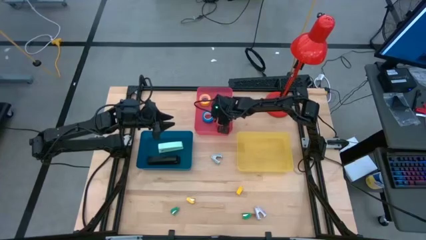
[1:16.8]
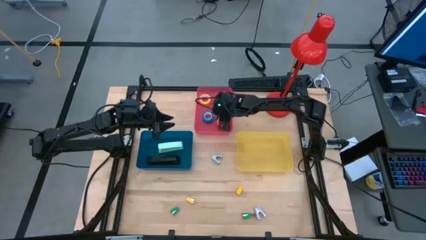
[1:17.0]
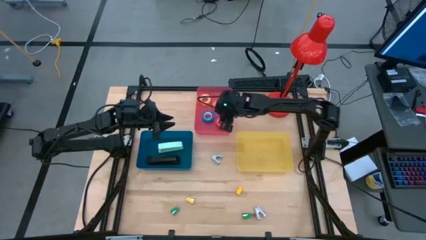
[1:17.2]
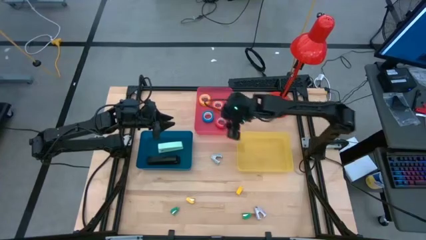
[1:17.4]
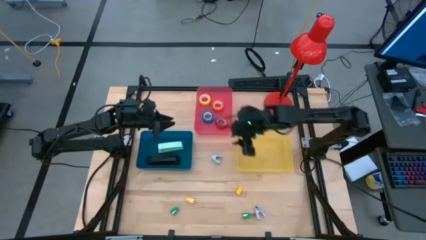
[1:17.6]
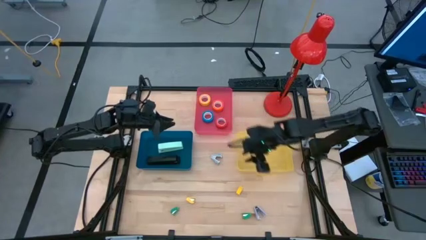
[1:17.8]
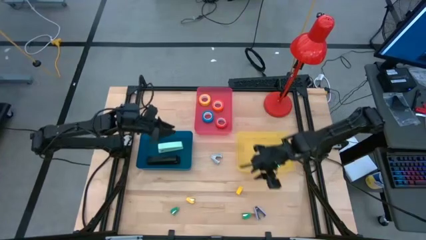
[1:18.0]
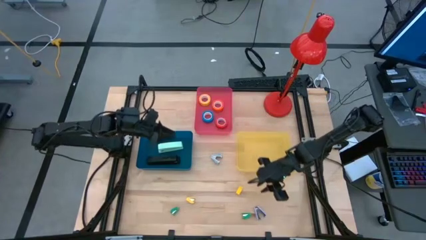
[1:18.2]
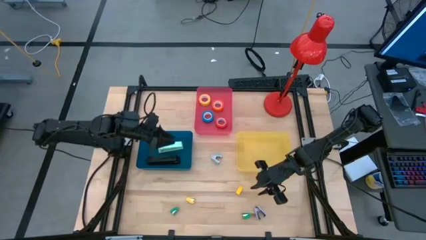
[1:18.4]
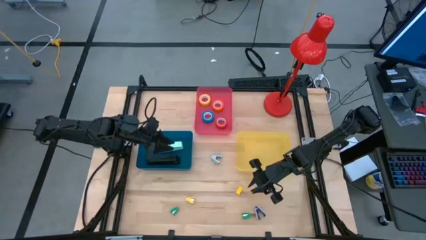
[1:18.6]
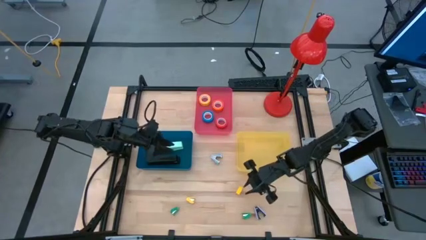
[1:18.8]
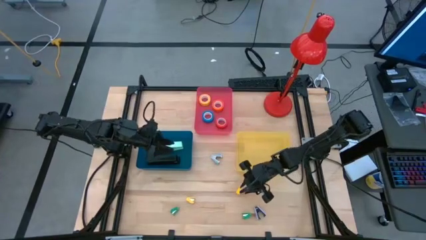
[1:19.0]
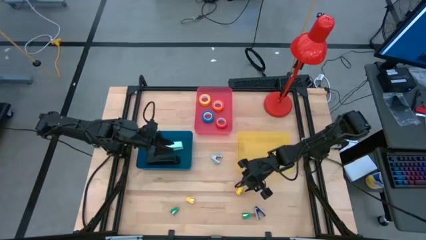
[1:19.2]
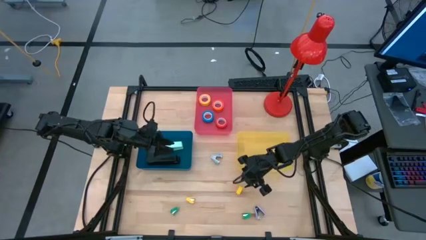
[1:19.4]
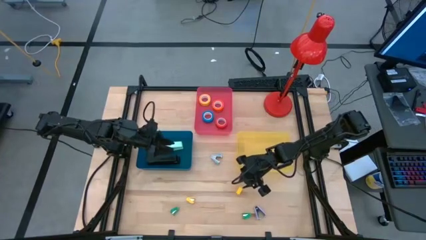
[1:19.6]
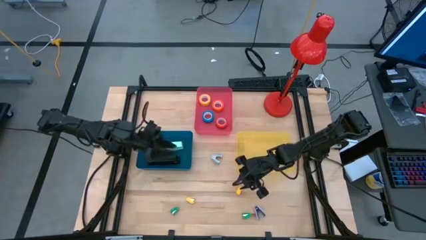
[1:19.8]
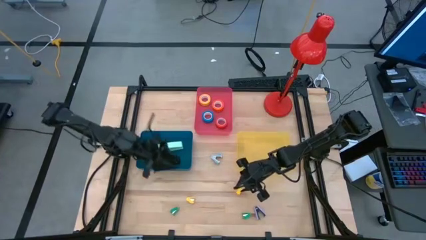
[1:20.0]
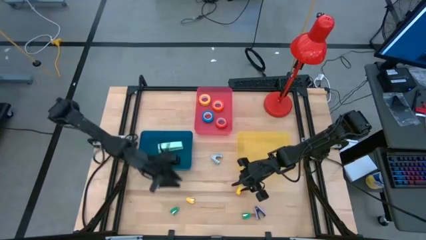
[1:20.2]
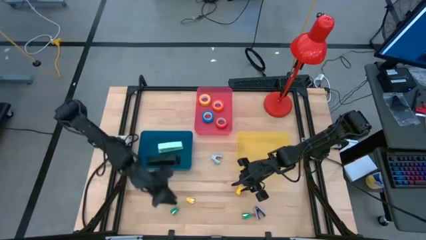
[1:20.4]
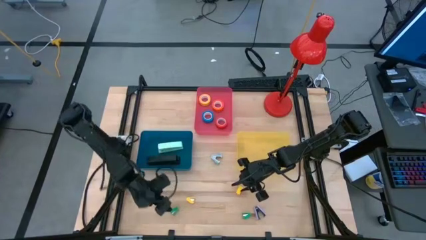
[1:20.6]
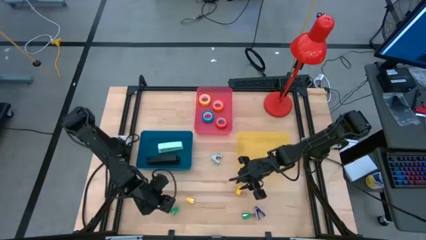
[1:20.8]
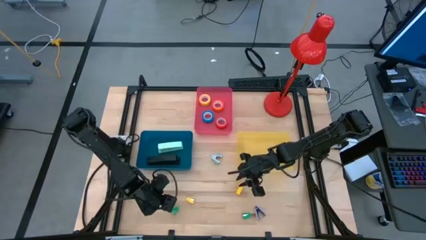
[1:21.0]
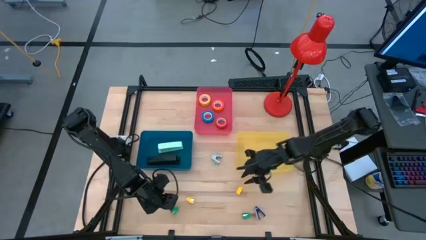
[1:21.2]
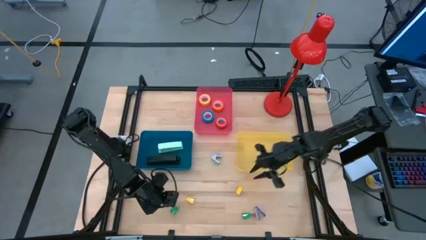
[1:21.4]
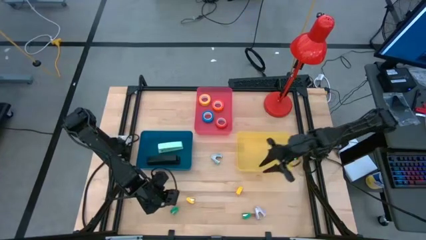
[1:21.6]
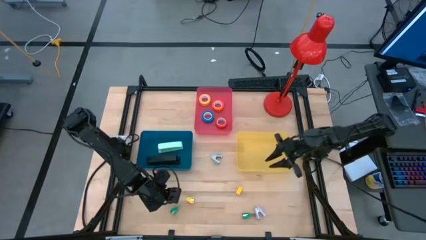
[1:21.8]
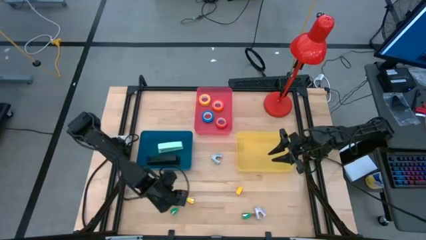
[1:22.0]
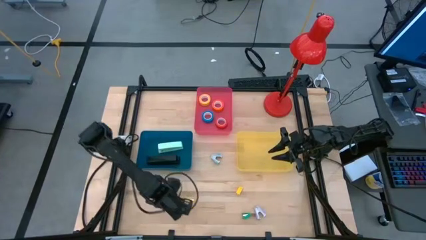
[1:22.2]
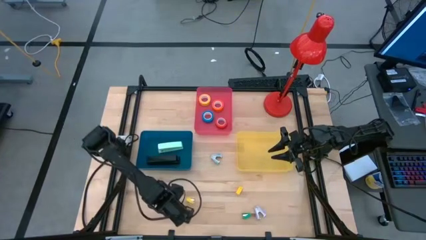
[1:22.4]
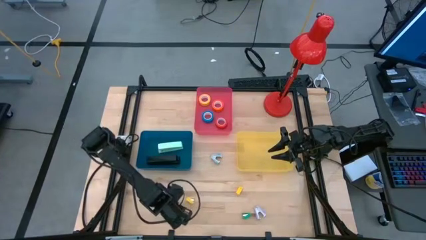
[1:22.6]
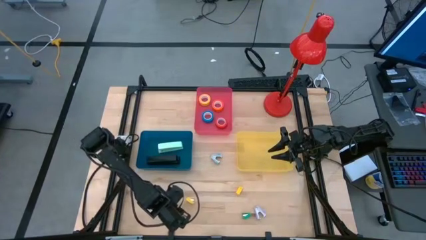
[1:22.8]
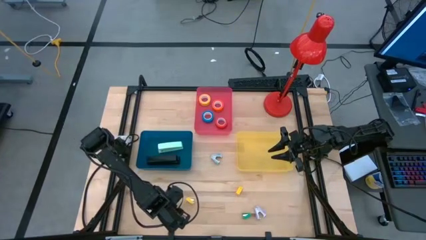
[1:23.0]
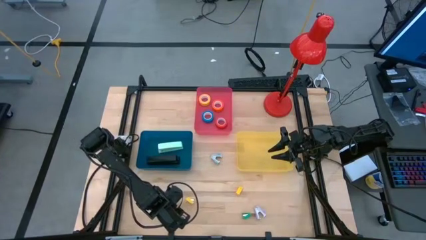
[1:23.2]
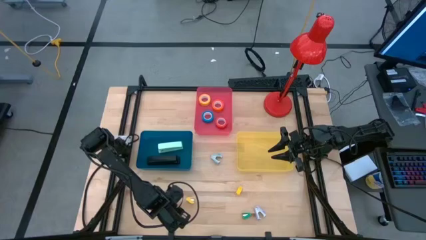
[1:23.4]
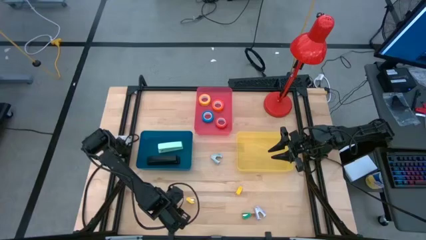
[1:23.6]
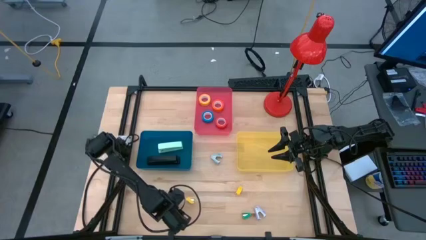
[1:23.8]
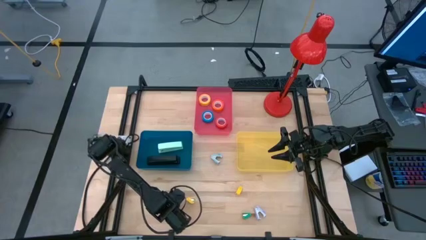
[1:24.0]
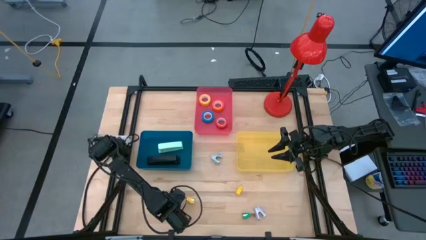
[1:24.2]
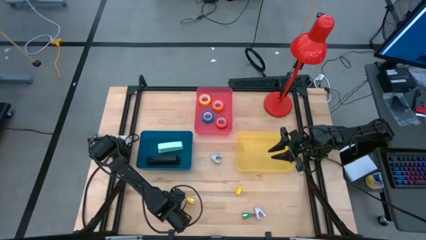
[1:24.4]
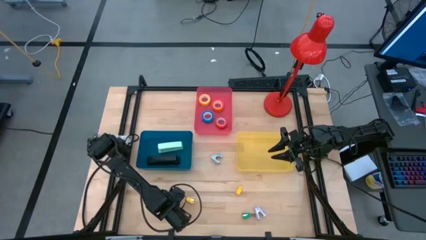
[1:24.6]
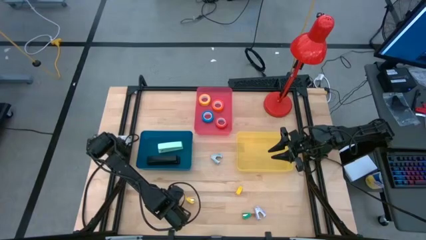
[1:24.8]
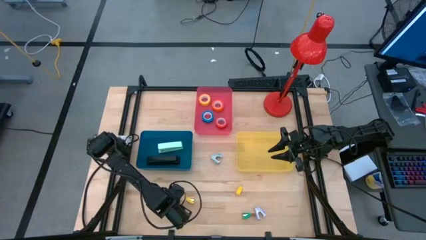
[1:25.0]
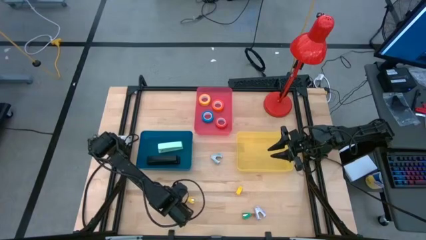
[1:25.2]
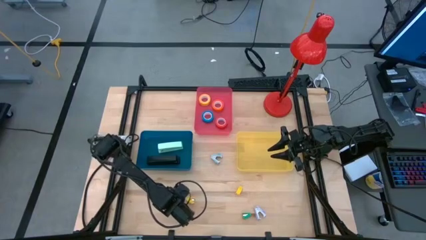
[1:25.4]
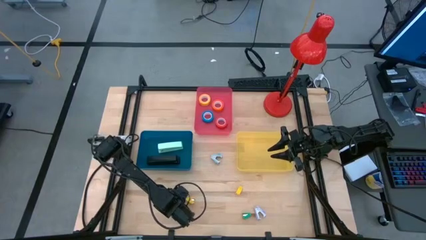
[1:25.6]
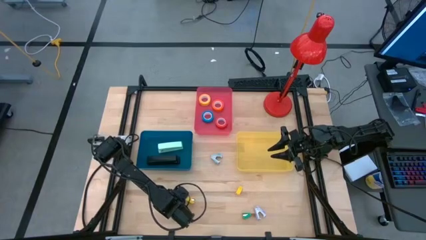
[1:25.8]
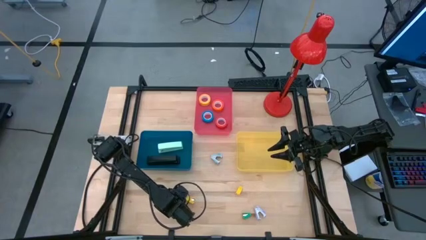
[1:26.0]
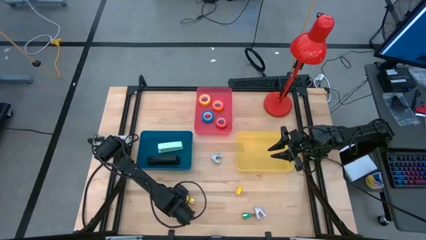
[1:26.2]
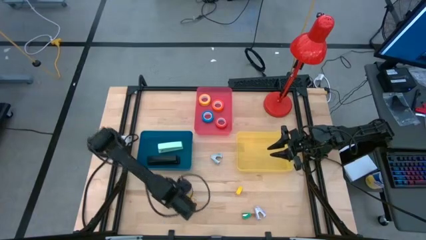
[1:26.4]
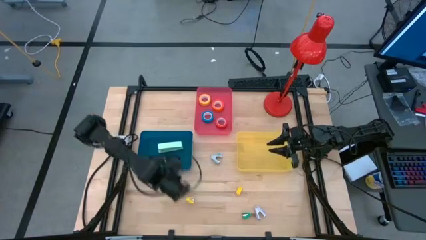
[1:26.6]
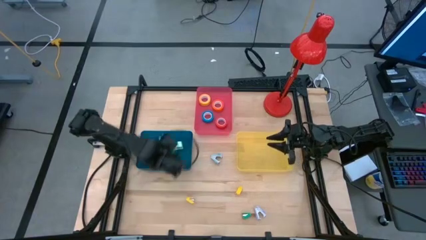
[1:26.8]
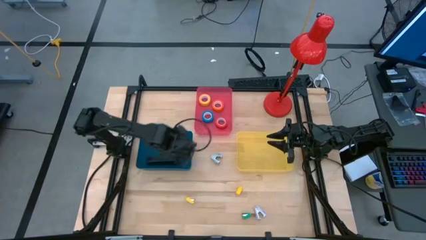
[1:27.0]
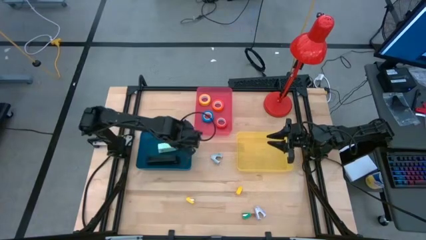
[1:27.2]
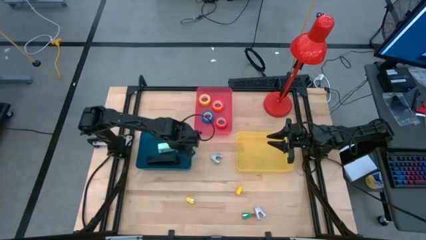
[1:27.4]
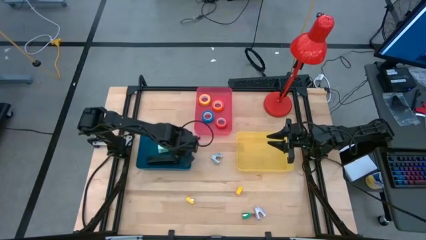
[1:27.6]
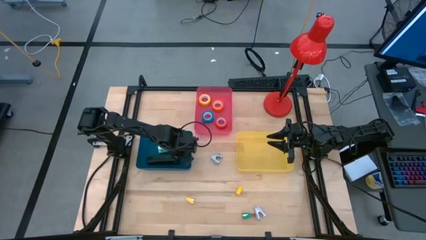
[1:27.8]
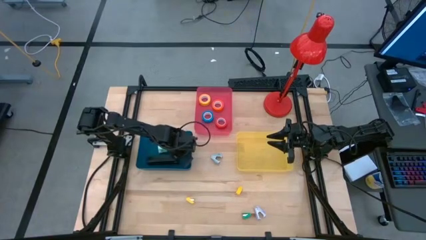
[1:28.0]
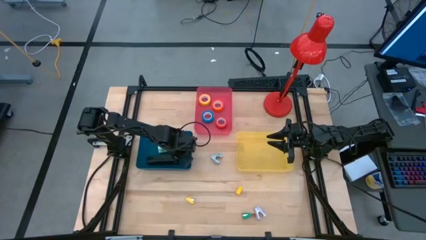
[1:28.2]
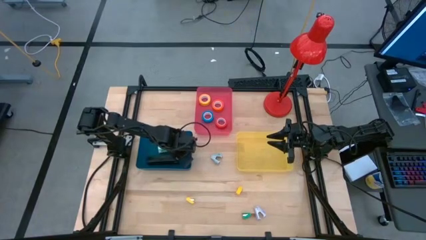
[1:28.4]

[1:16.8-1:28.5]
Task: Pick and place Stapler, Stapler remover, tape
Put the left green stapler into the blue bin

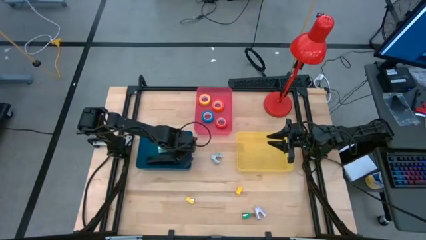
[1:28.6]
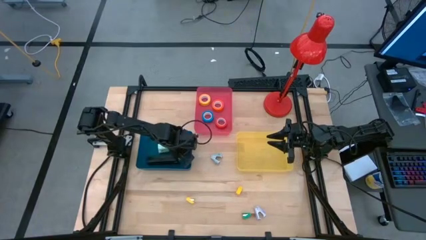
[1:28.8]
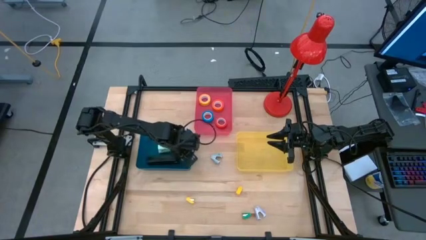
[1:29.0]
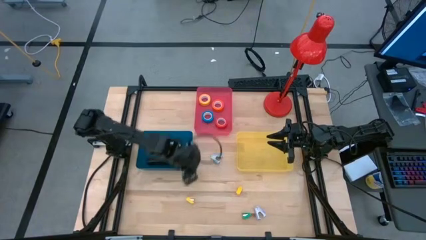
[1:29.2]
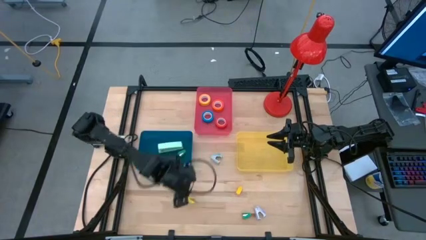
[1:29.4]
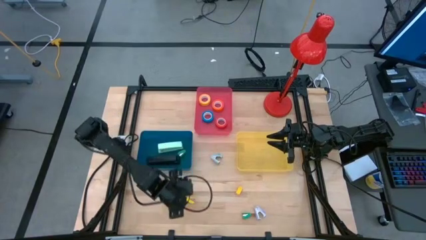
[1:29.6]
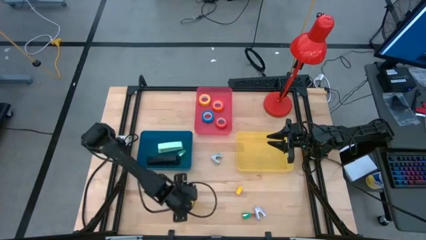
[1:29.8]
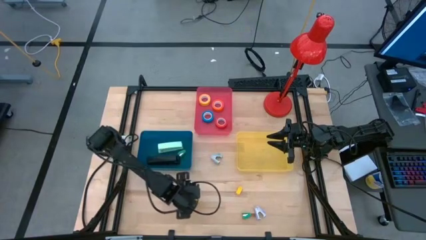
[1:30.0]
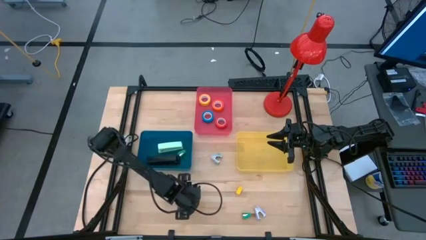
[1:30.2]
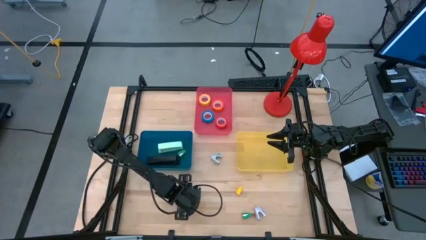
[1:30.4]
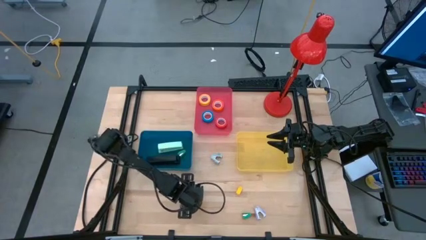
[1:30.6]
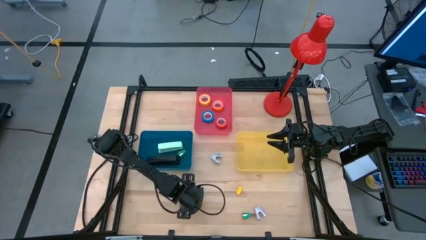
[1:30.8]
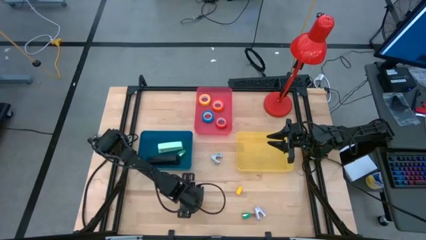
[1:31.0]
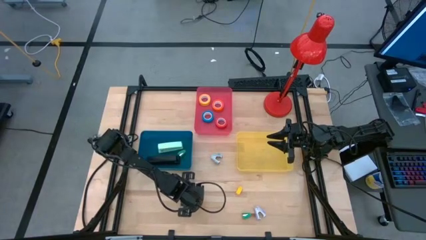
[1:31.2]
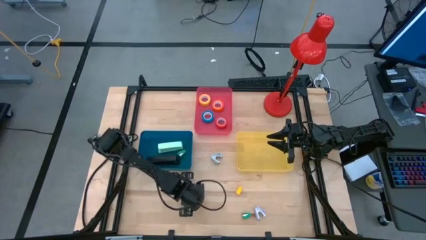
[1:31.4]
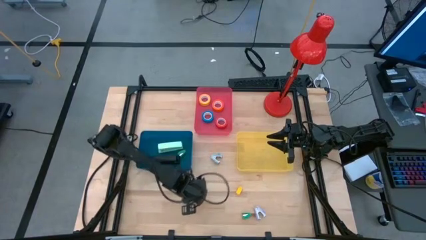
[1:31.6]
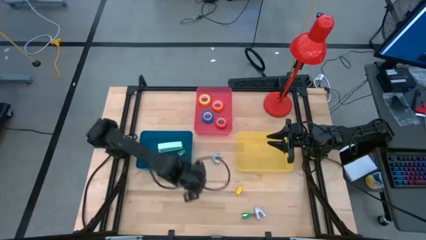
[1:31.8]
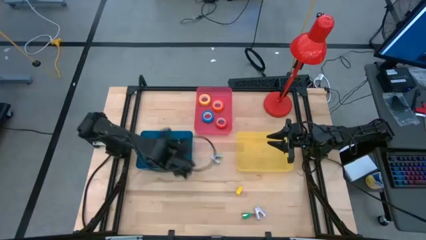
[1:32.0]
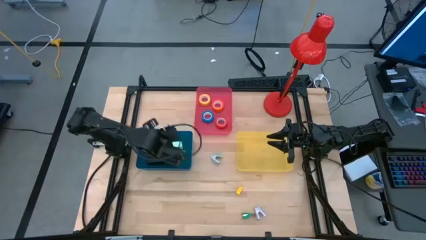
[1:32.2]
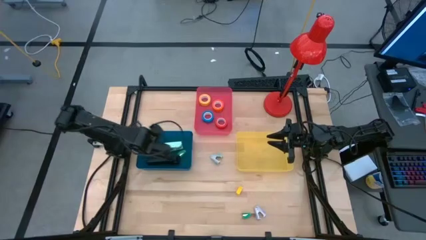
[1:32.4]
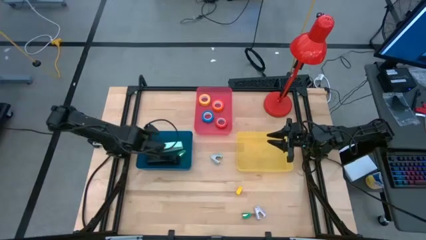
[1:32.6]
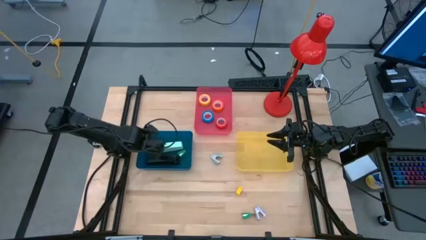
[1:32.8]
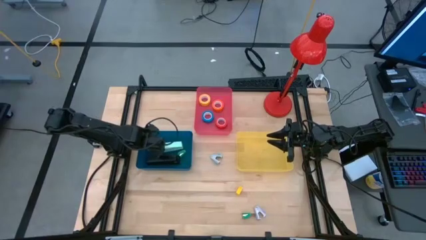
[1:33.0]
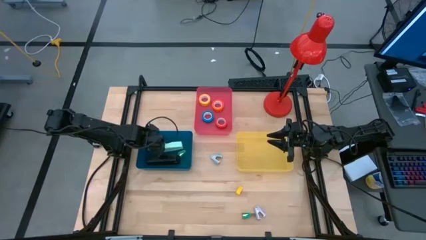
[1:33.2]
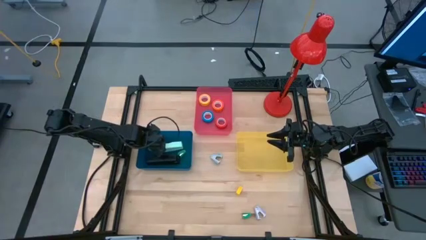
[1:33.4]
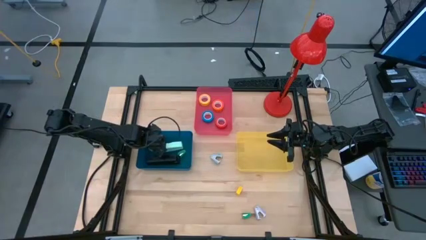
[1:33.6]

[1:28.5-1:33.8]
Put the left yellow stapler into the blue bin
